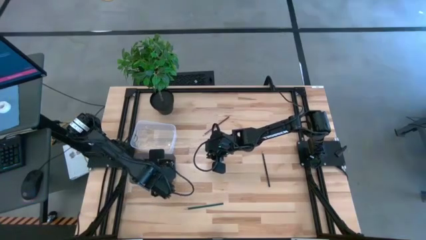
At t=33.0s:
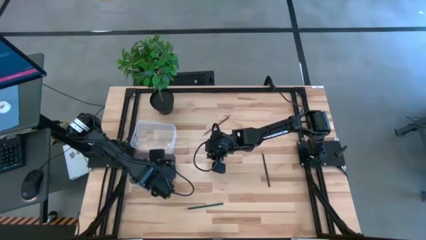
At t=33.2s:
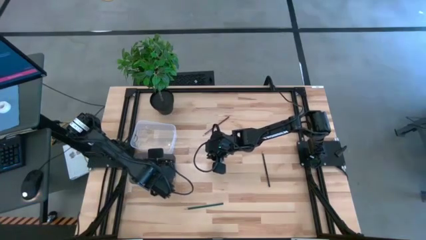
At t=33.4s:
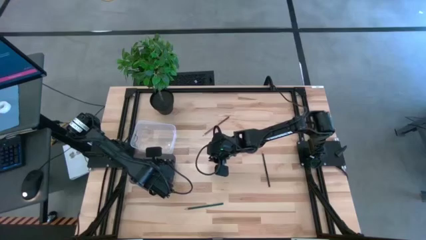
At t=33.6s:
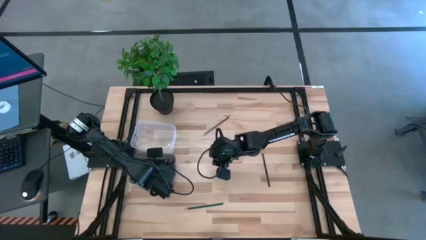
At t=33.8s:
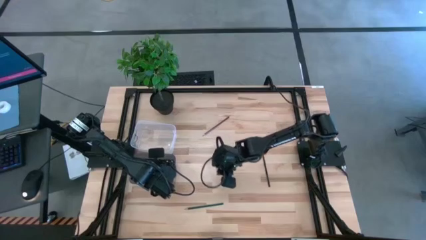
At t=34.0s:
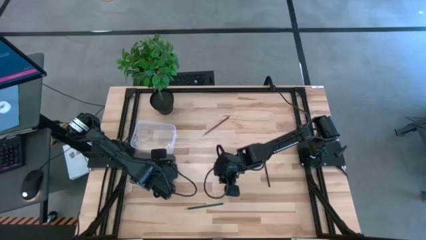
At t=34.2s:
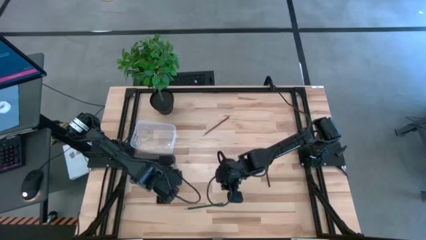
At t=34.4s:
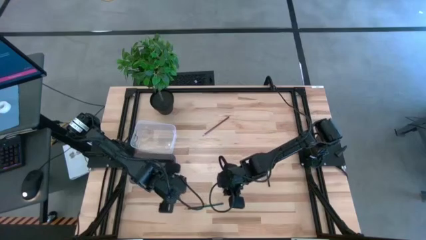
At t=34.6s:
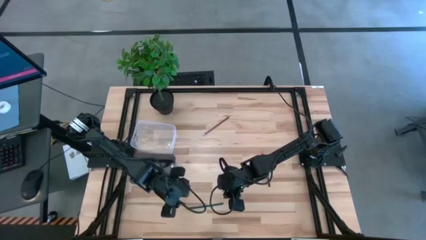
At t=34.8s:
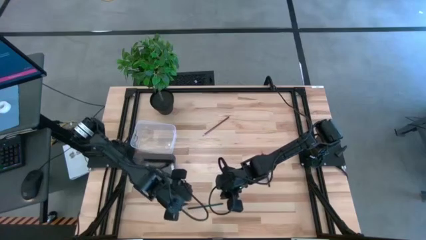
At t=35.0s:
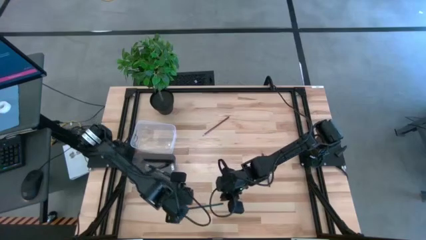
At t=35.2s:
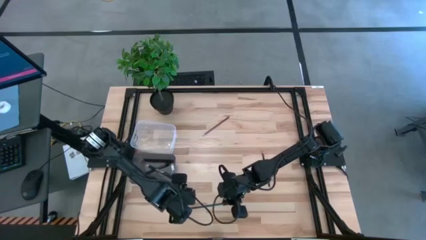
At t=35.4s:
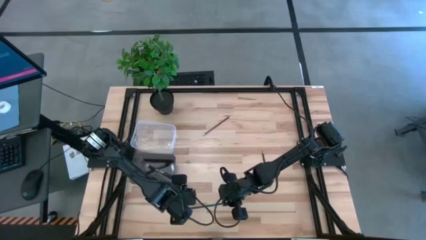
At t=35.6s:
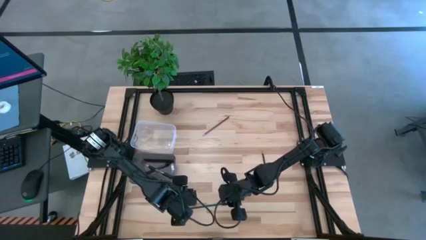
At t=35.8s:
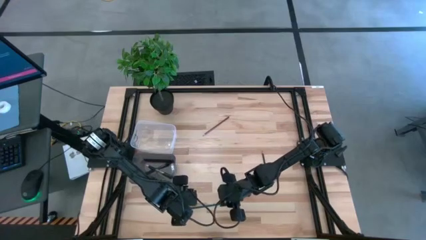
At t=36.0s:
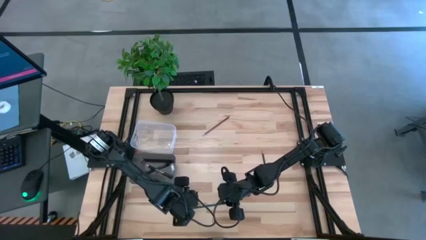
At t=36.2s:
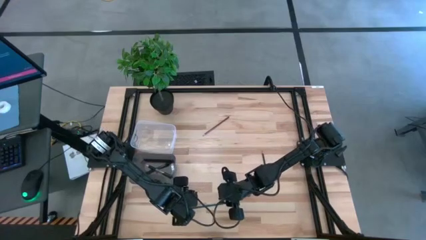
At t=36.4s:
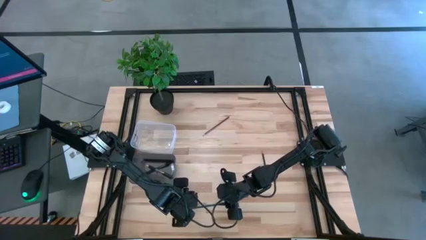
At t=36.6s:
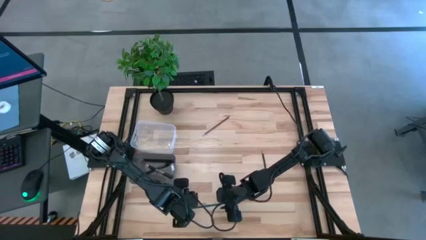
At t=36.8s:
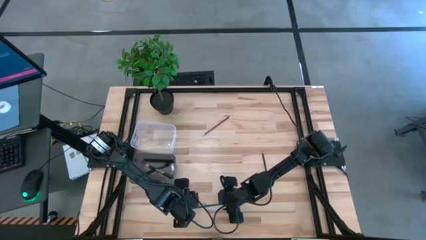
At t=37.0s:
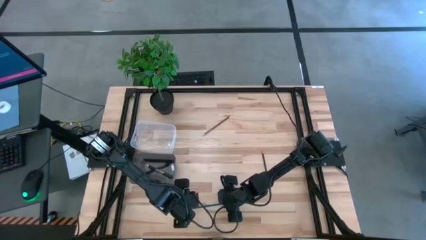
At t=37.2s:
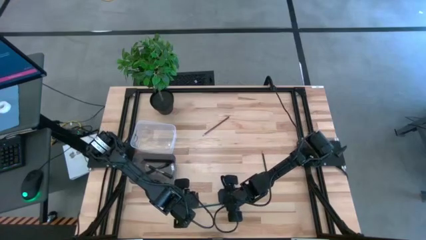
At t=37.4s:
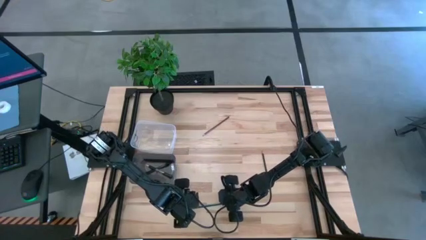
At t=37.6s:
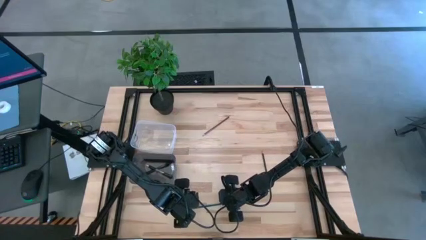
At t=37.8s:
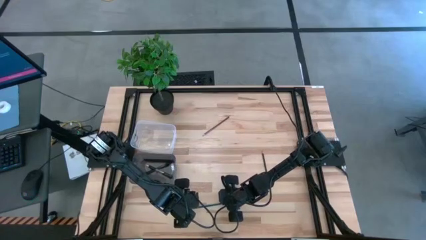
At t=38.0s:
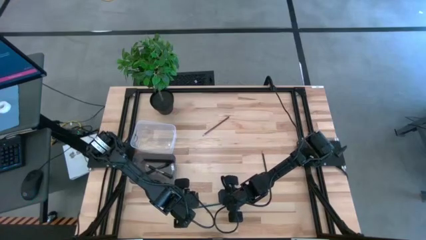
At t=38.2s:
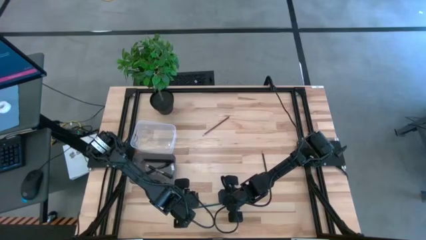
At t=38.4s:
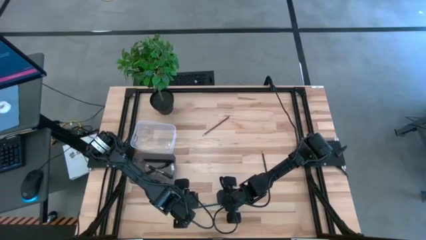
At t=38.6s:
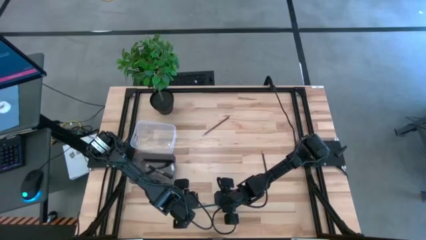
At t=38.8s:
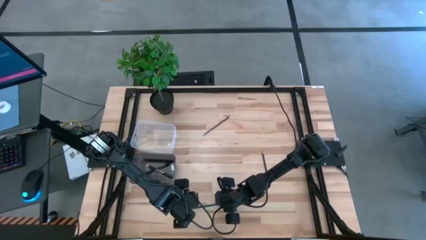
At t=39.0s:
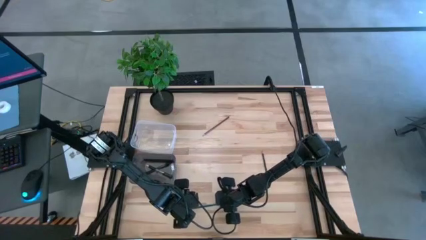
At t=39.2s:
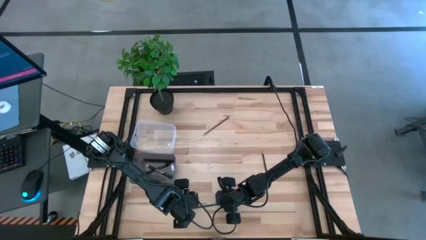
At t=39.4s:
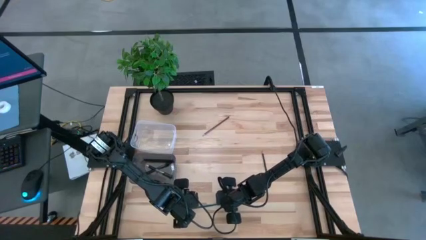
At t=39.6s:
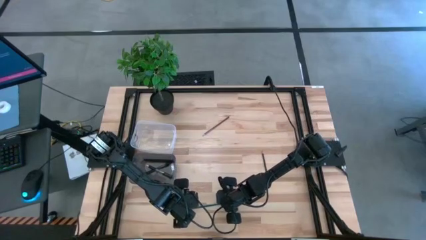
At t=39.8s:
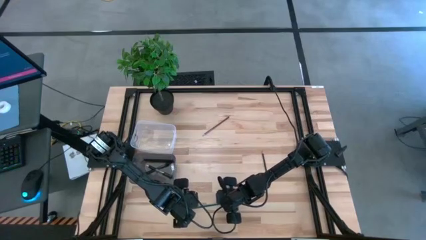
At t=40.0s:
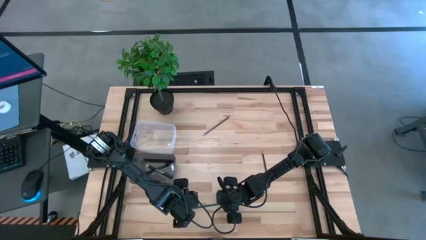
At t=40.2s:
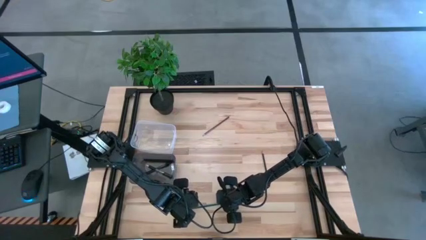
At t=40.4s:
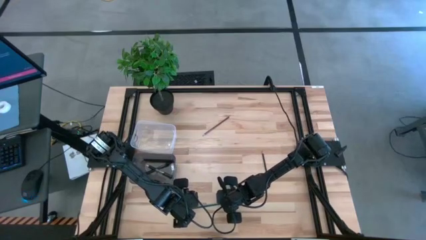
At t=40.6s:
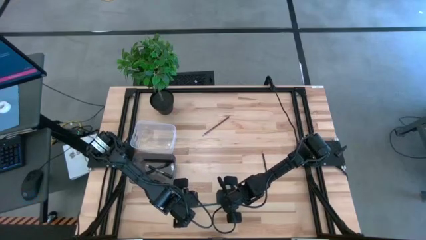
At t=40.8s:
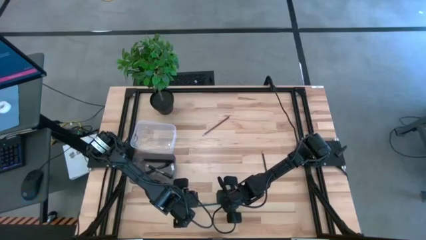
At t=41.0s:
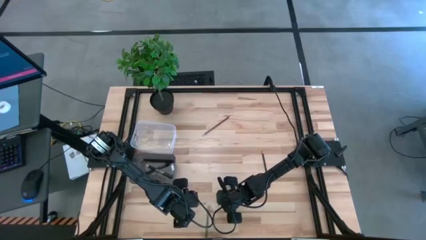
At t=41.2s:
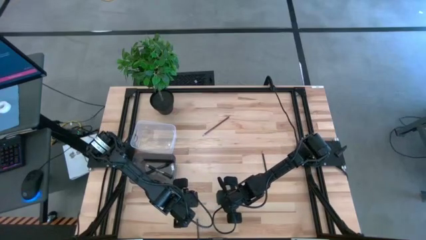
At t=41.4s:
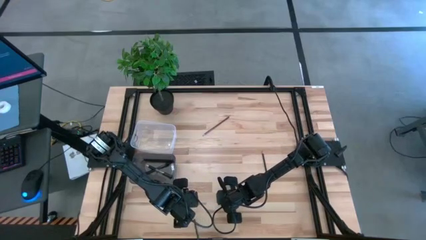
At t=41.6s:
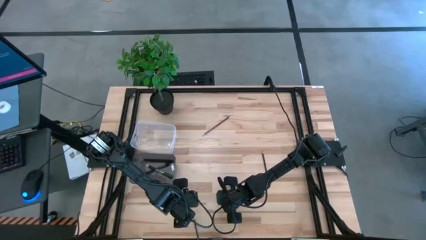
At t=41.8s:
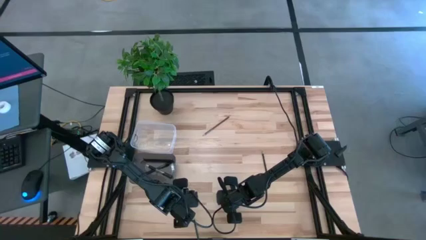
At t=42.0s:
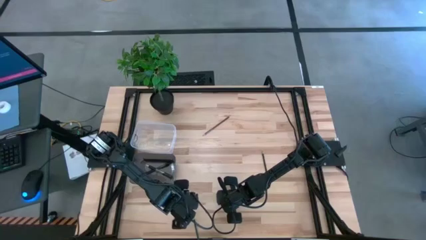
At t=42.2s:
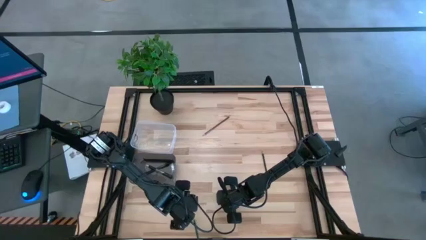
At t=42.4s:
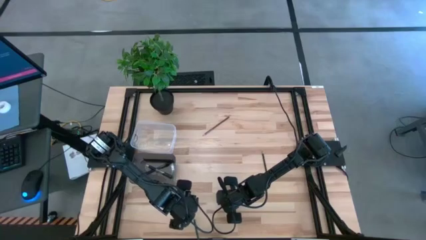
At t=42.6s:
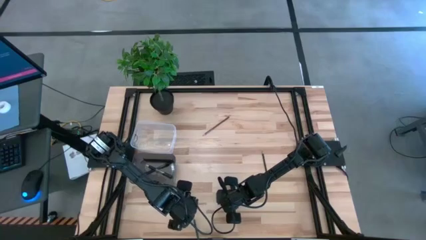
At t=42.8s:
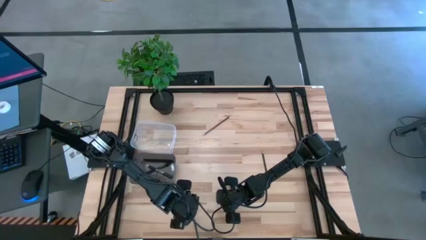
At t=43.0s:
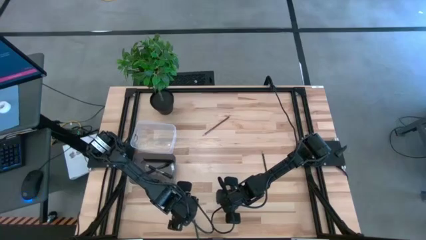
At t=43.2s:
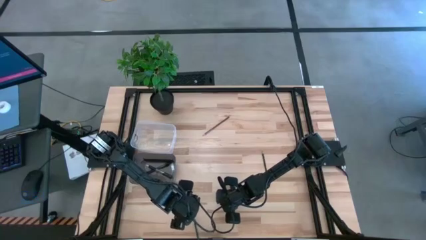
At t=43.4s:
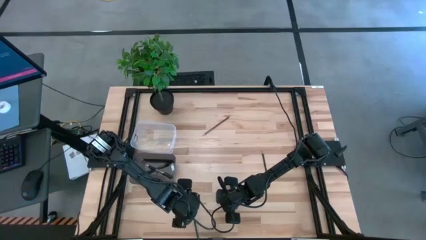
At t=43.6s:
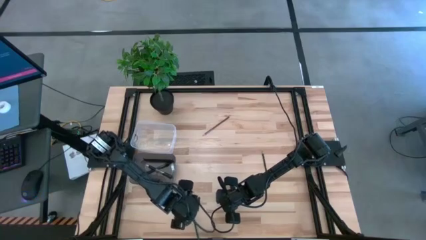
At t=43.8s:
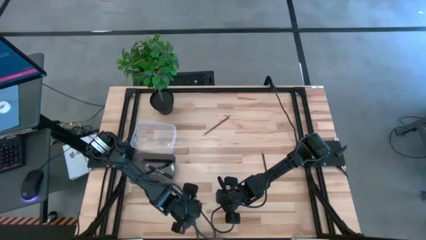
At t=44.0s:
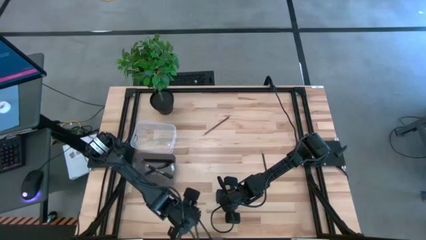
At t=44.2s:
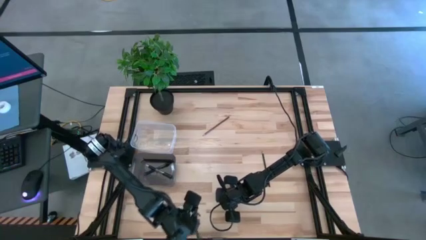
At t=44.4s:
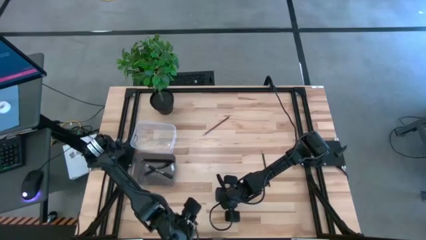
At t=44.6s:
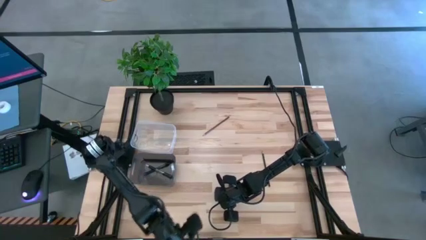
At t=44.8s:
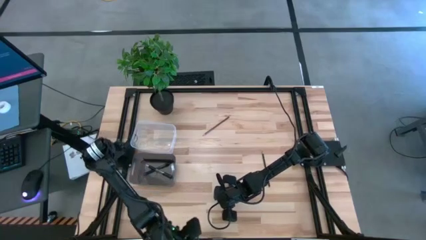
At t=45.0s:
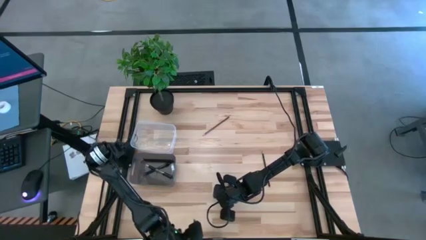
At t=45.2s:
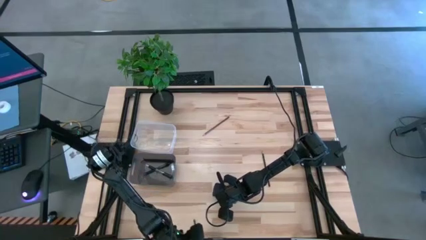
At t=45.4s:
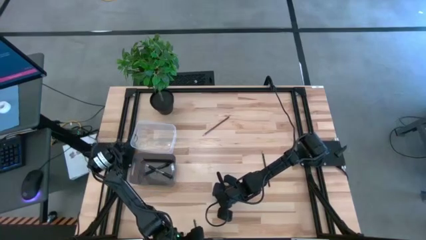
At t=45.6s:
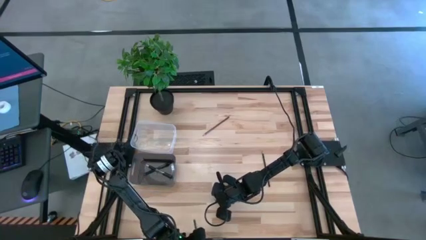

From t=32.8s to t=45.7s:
Task: Sort pens & pencils
Put the green pencil into the transparent bin
